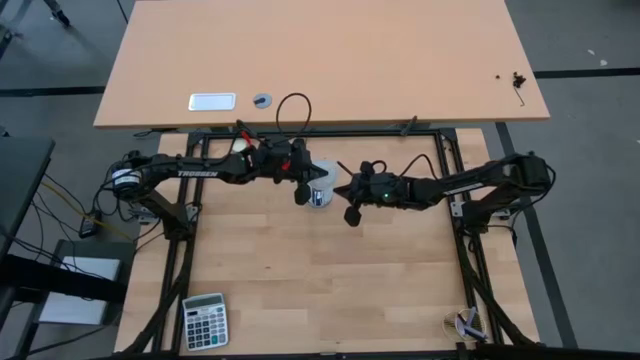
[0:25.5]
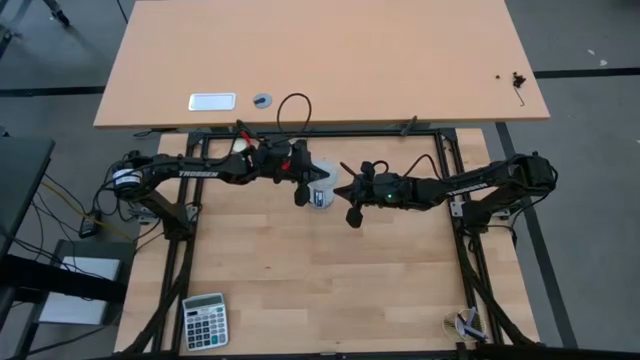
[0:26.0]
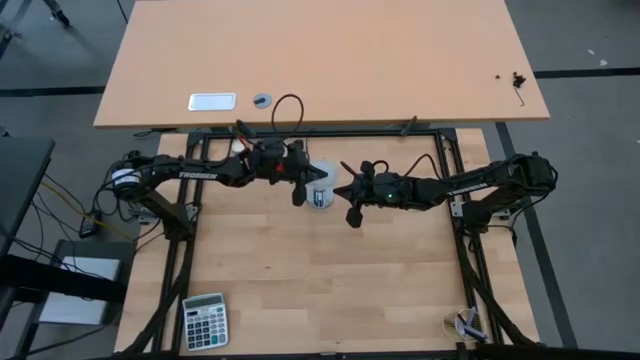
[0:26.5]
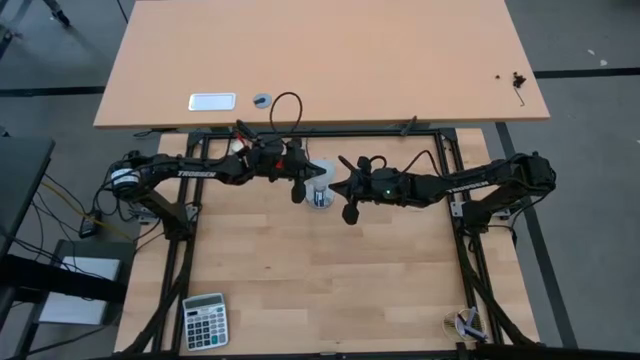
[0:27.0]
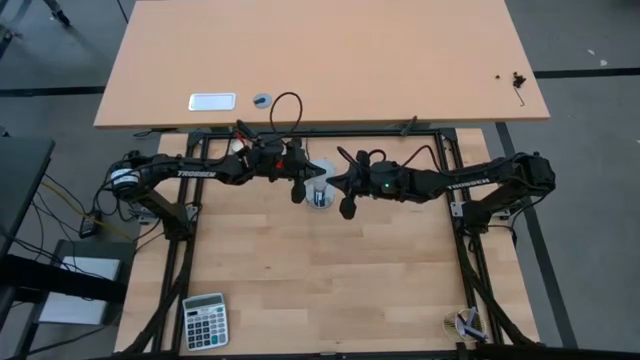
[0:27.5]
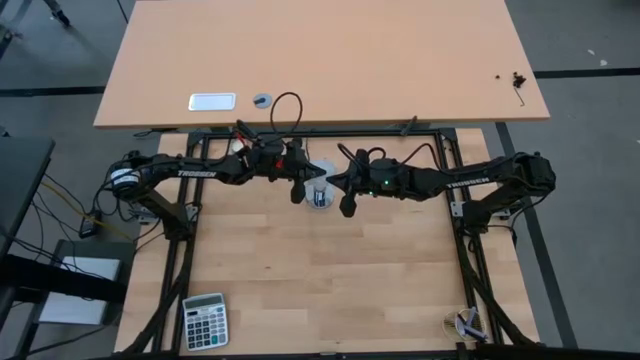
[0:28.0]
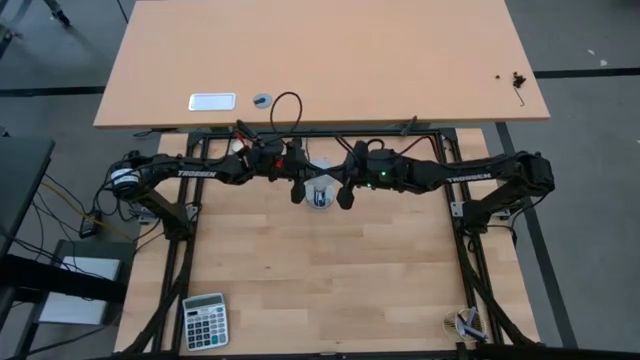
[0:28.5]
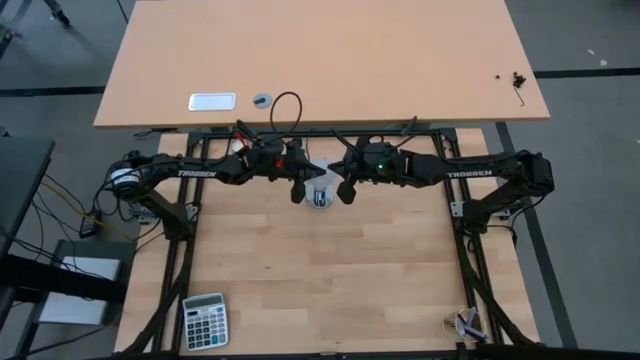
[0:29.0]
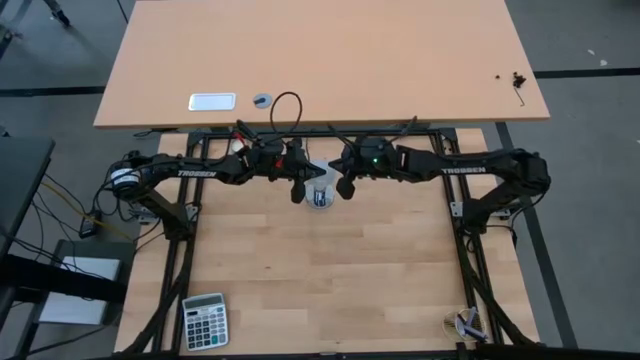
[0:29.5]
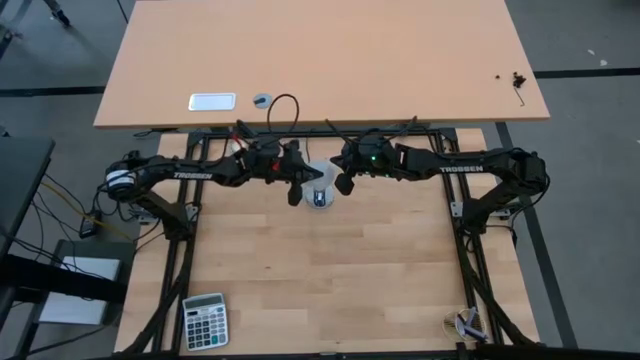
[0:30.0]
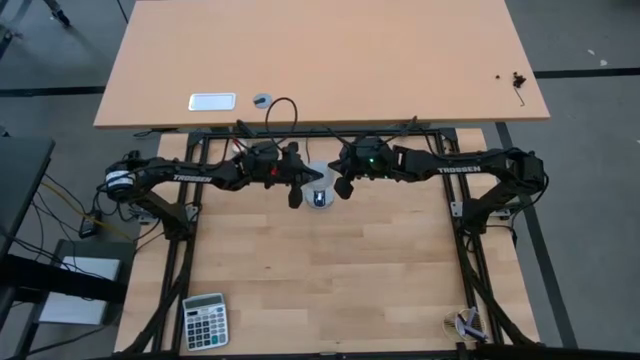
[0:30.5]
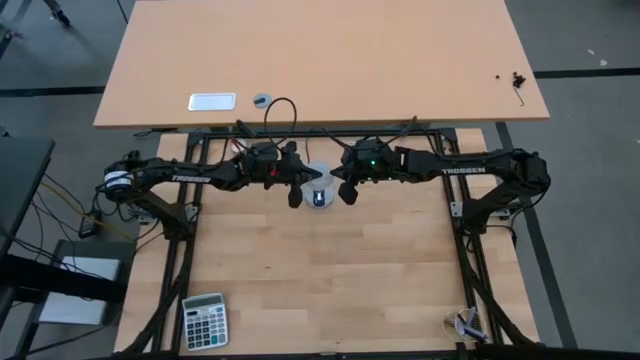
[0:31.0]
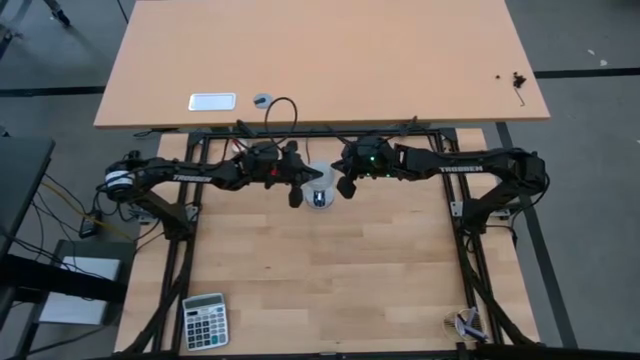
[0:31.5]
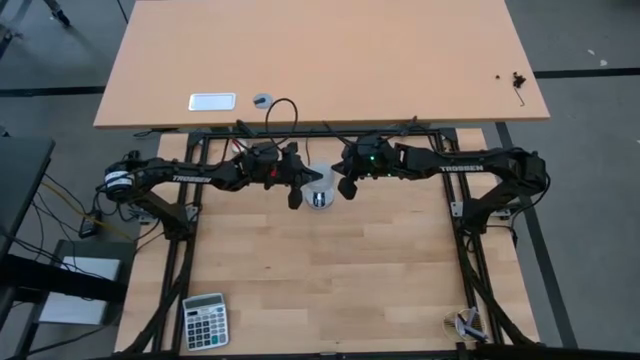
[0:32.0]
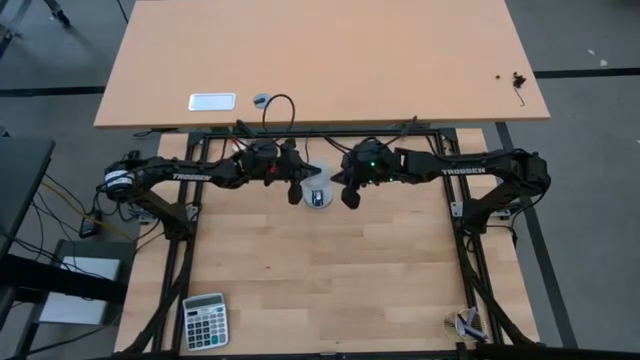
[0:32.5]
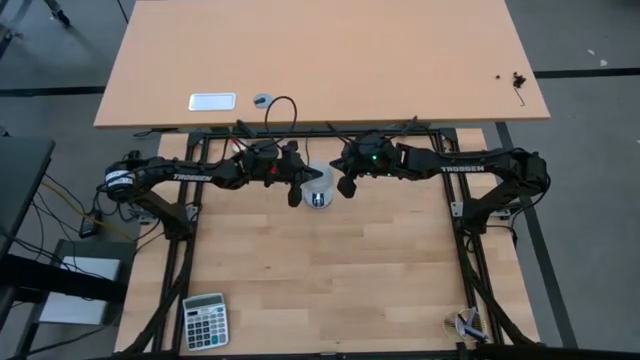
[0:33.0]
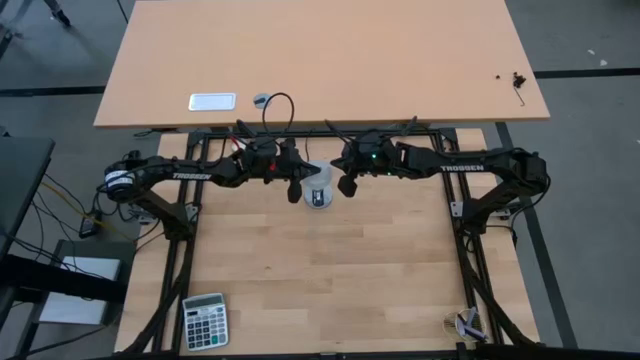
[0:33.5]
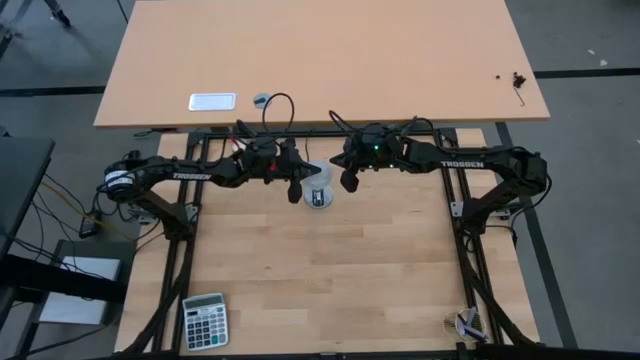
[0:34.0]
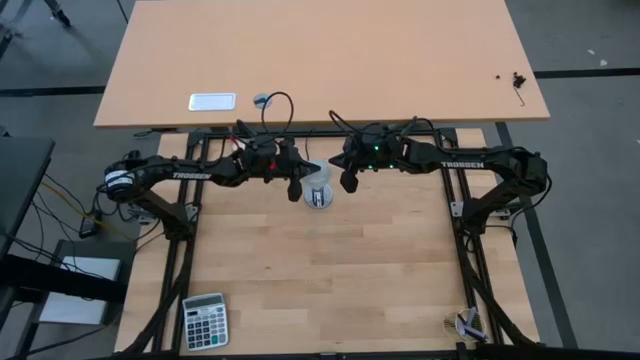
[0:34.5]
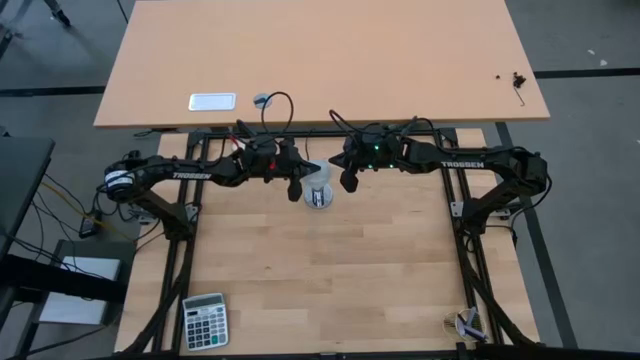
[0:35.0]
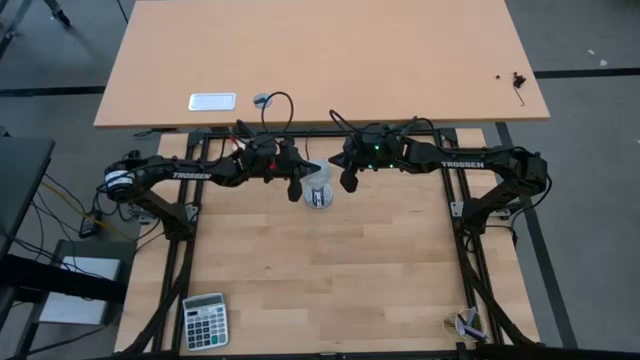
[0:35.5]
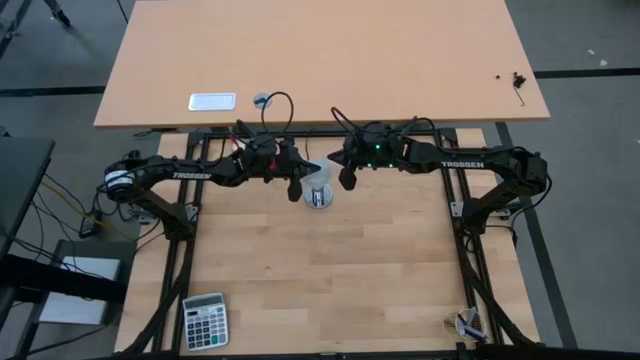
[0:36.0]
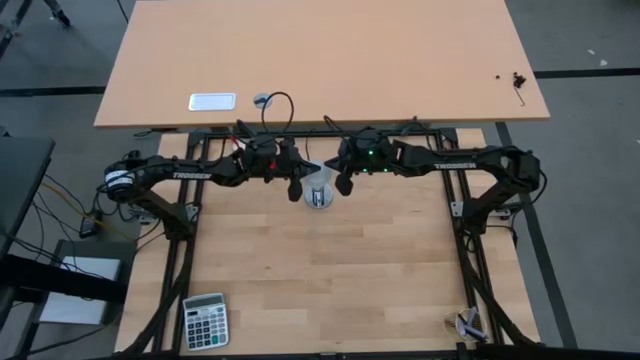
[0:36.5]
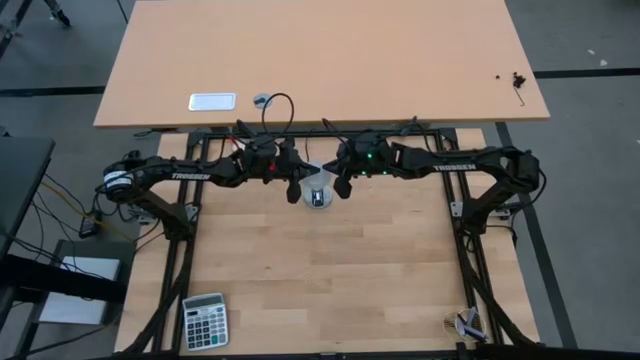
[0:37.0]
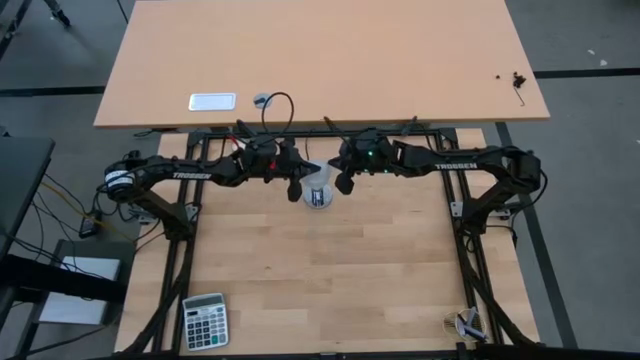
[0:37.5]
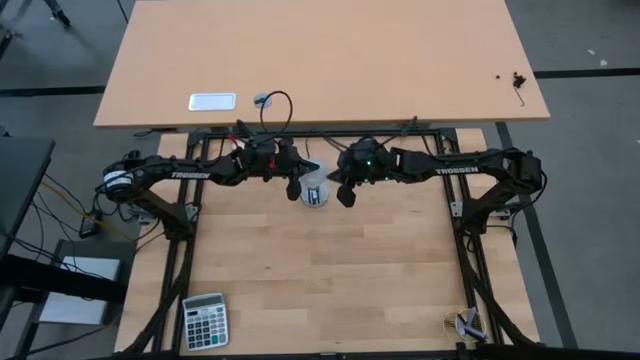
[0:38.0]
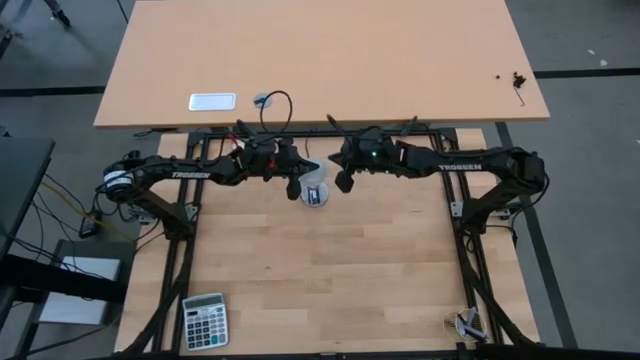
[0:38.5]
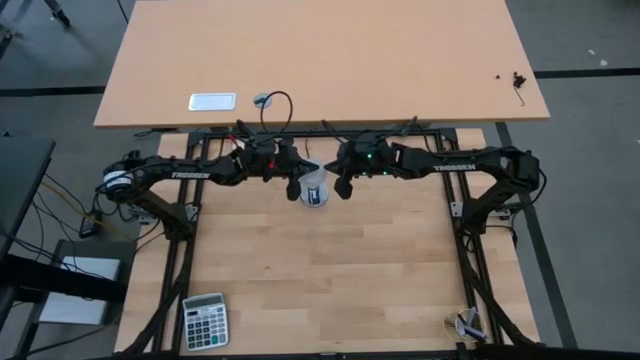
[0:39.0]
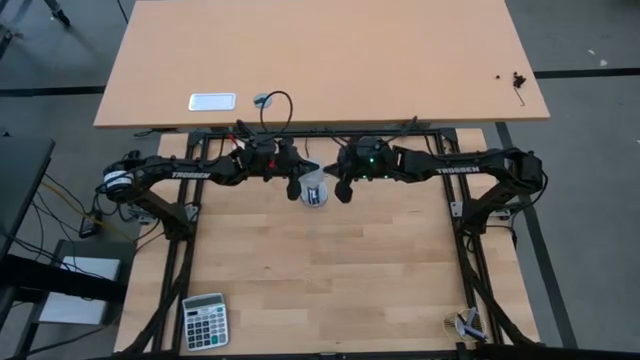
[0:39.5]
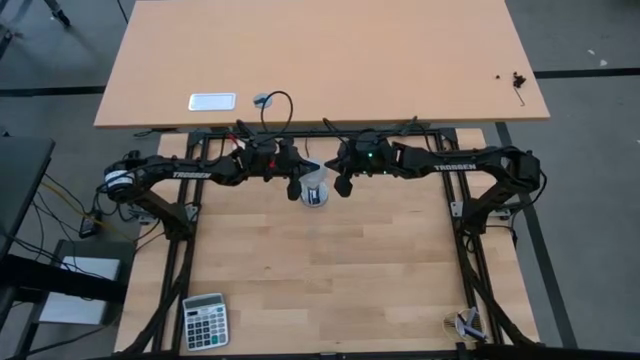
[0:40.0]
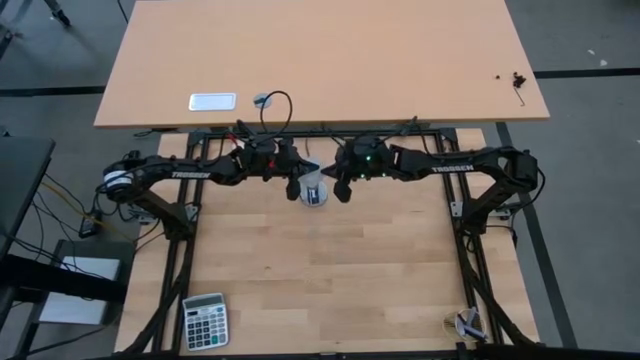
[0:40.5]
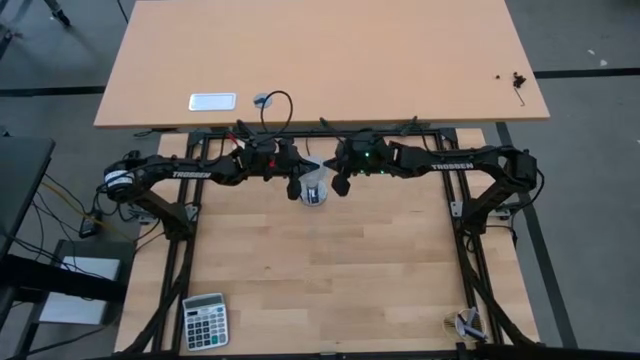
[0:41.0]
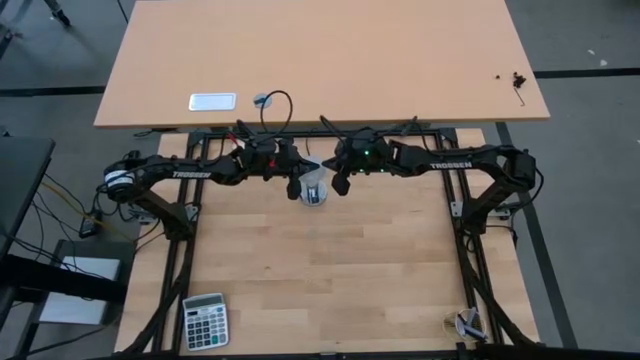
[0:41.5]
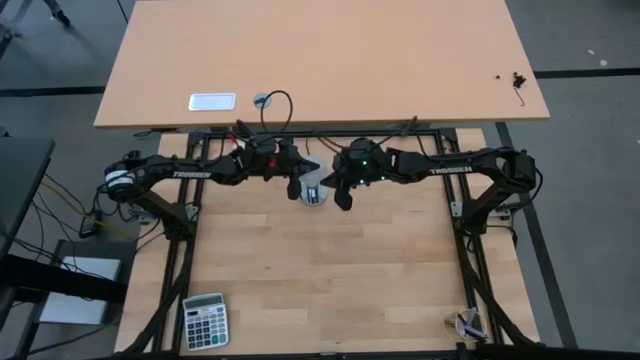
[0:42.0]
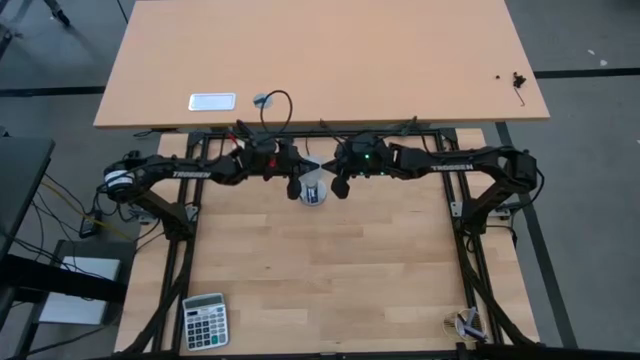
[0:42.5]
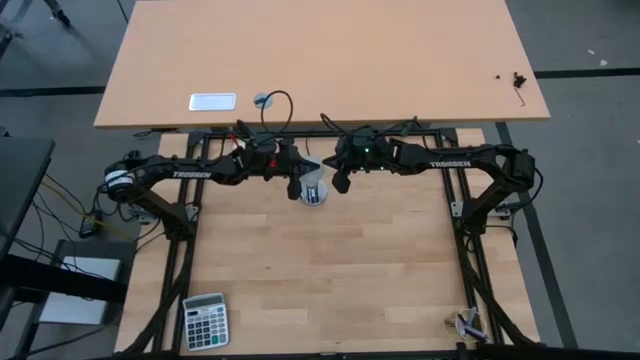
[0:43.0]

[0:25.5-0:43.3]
Task: Screw lightbulb
Insert the lightbulb into the lamp

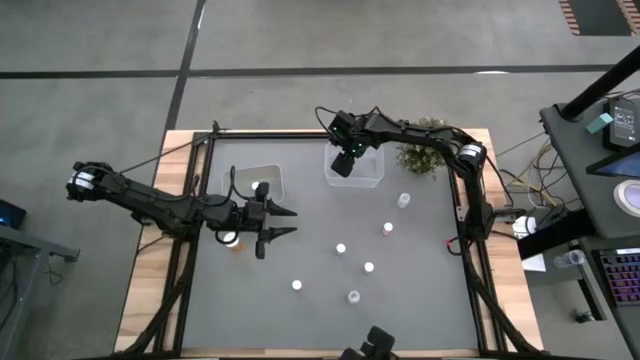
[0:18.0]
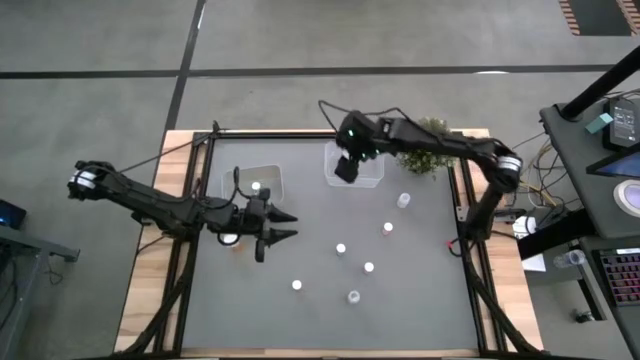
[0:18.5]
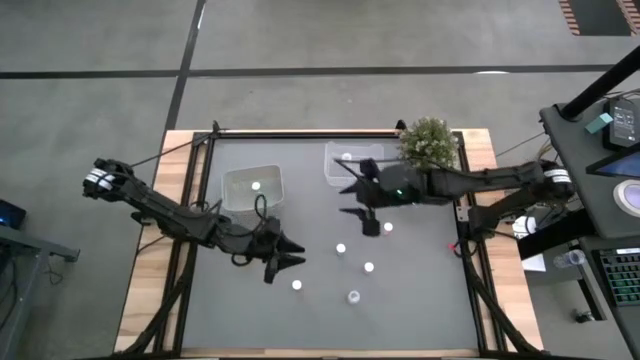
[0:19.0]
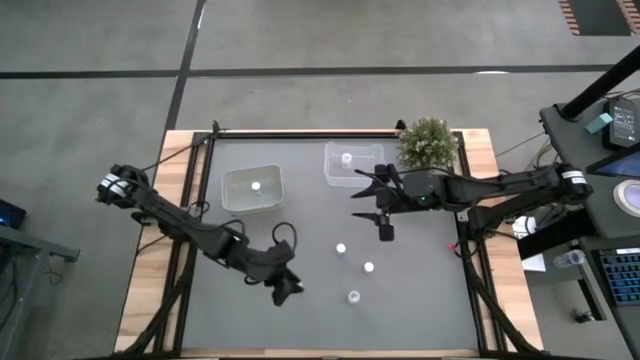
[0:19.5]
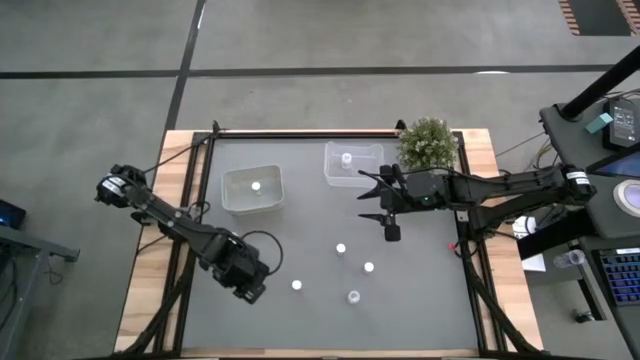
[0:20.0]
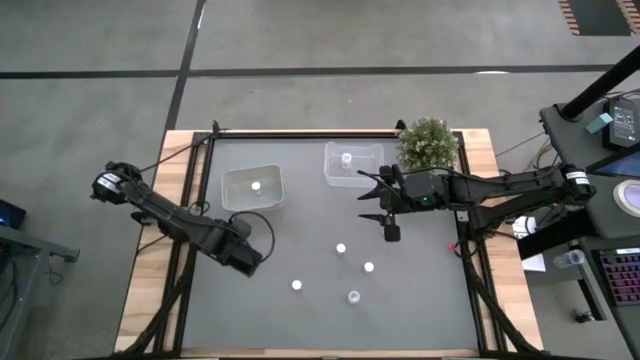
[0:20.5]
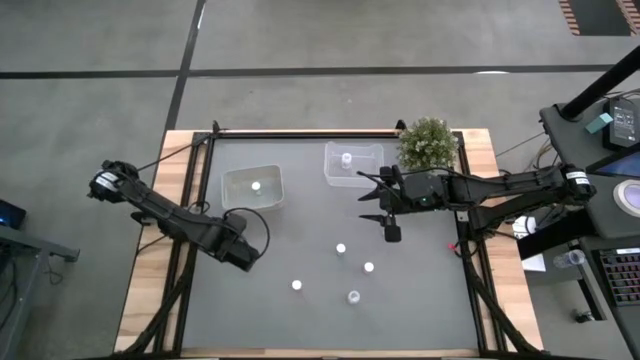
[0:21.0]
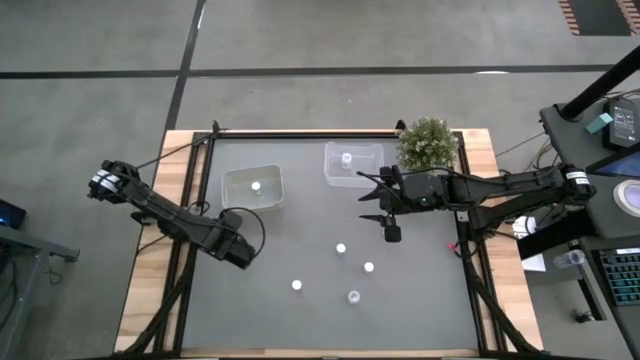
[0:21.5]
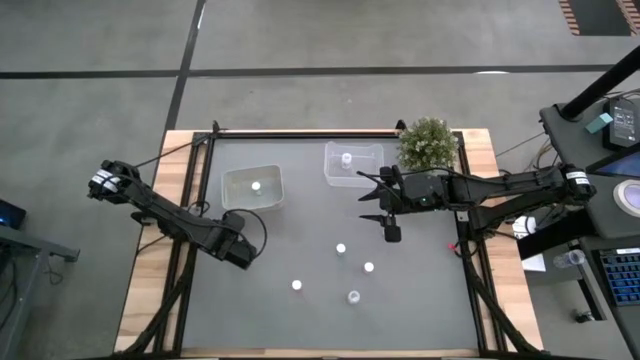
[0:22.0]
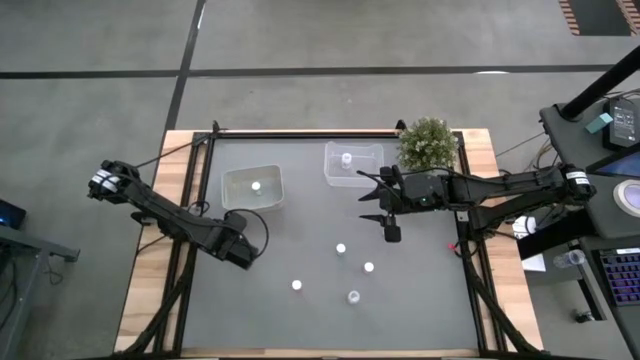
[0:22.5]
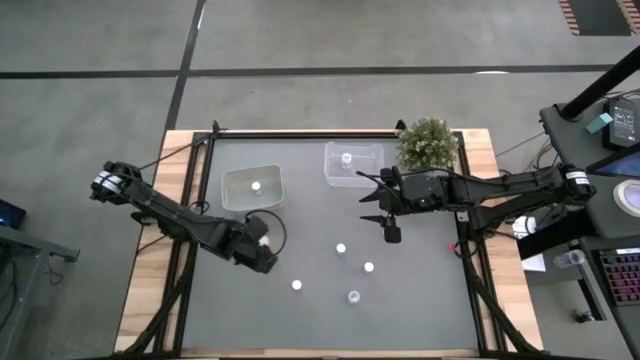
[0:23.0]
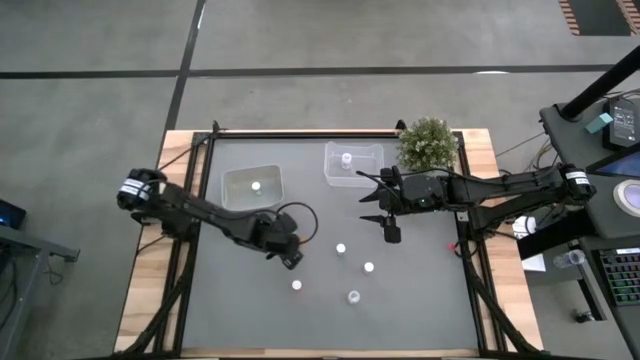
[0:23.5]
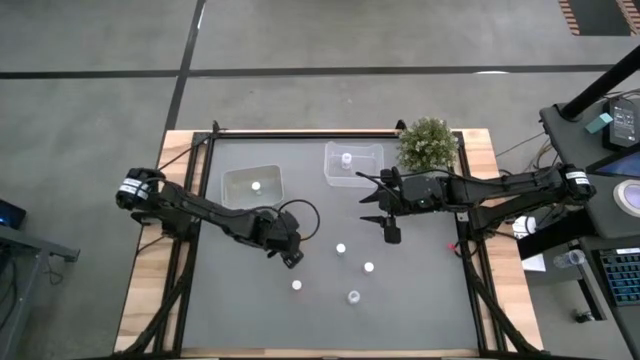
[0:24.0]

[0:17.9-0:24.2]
Task: Pick and place medicine bottles into bin by pill shape (circle, oval)
Put the big orange pill bottle into the transparent bin
